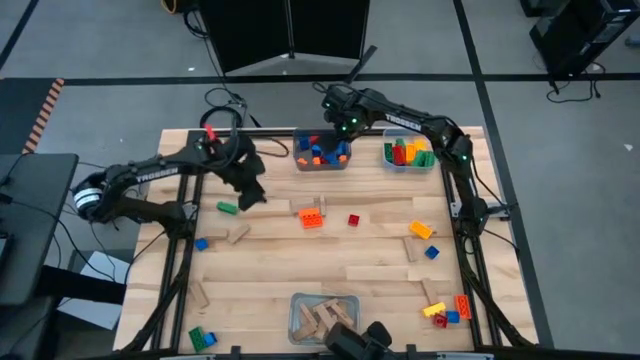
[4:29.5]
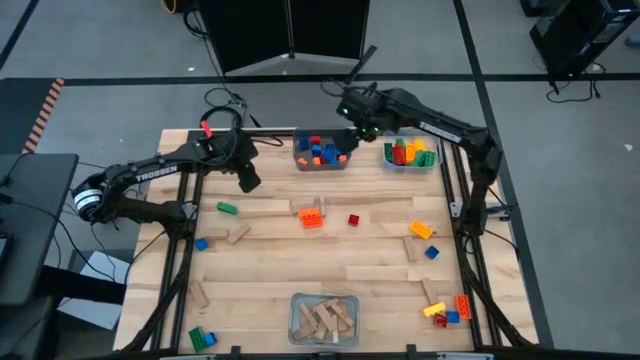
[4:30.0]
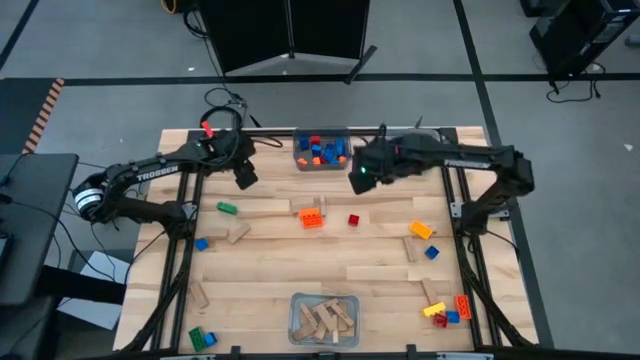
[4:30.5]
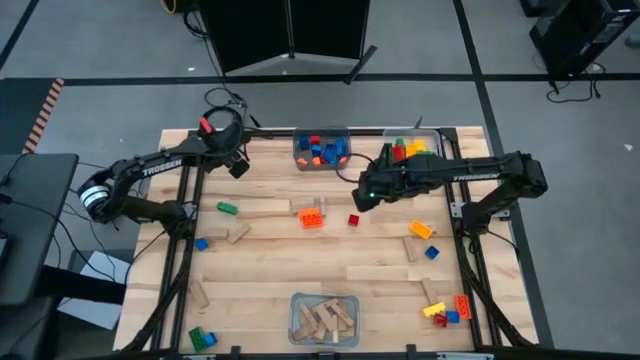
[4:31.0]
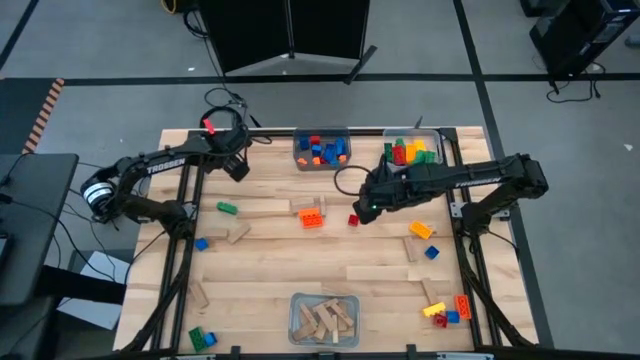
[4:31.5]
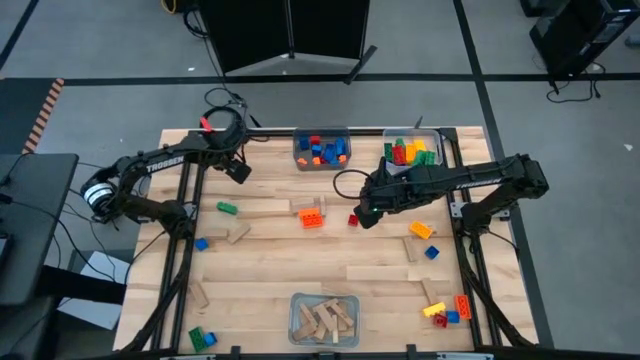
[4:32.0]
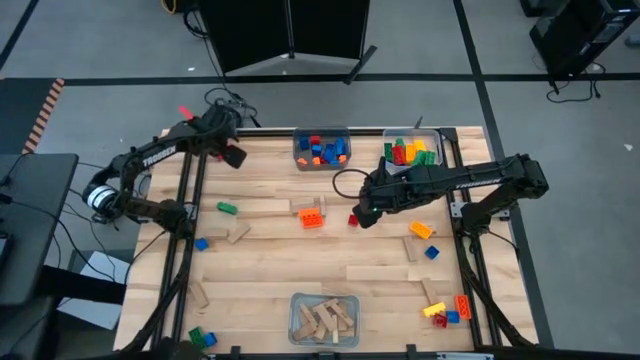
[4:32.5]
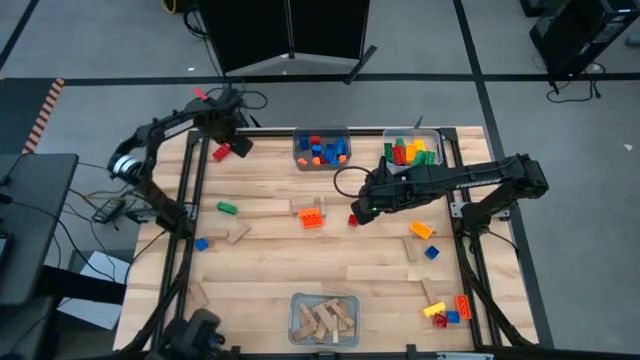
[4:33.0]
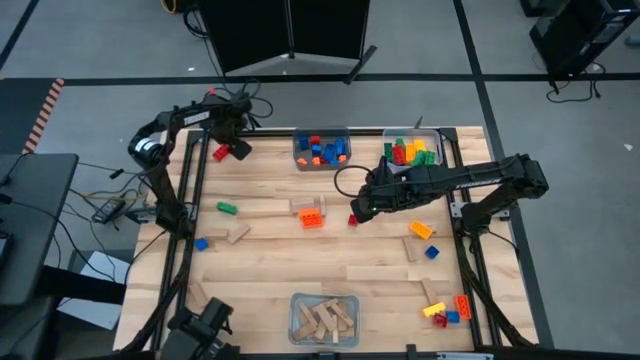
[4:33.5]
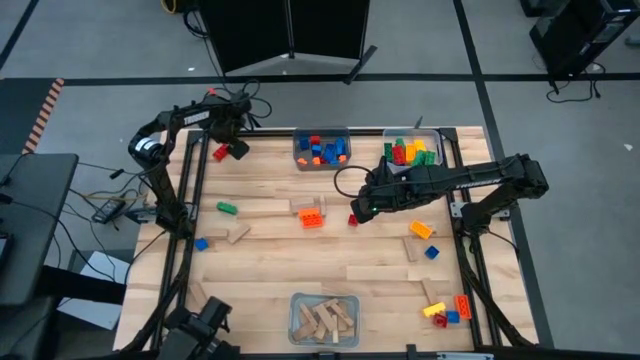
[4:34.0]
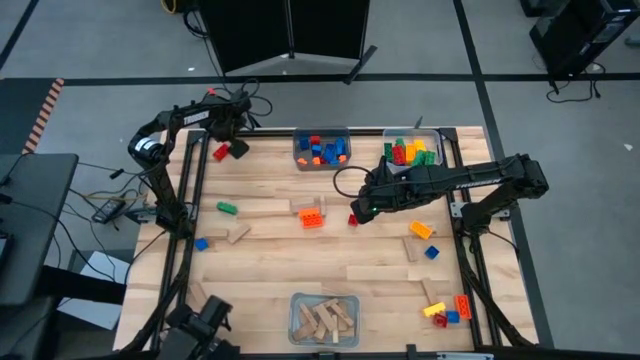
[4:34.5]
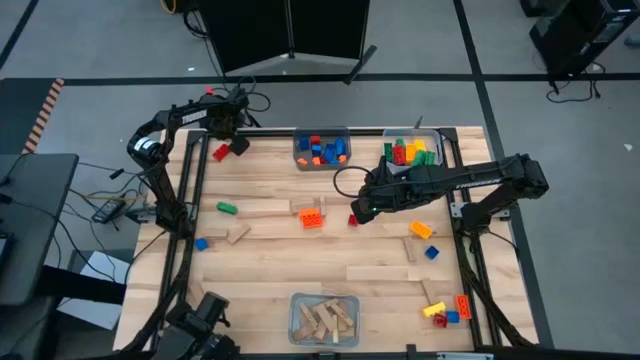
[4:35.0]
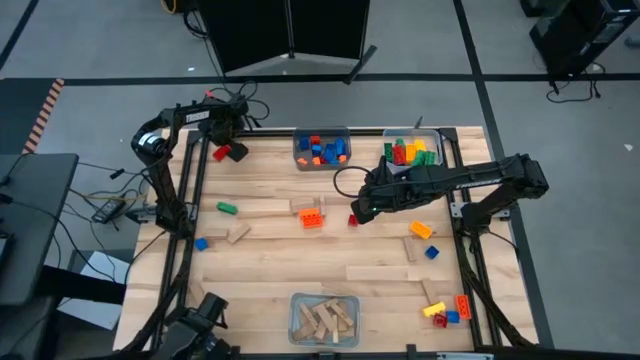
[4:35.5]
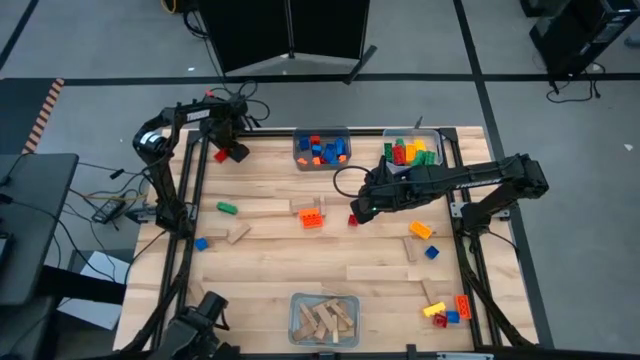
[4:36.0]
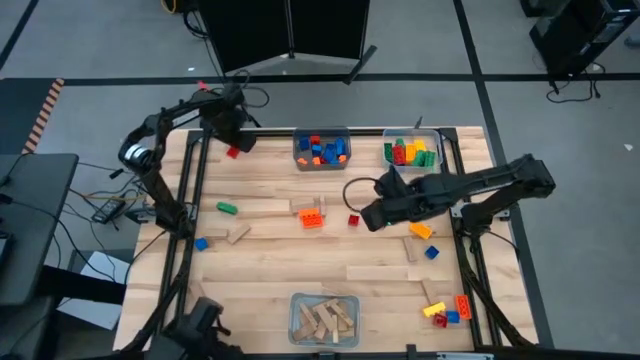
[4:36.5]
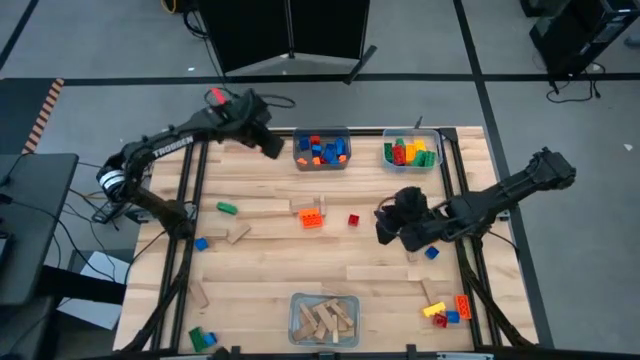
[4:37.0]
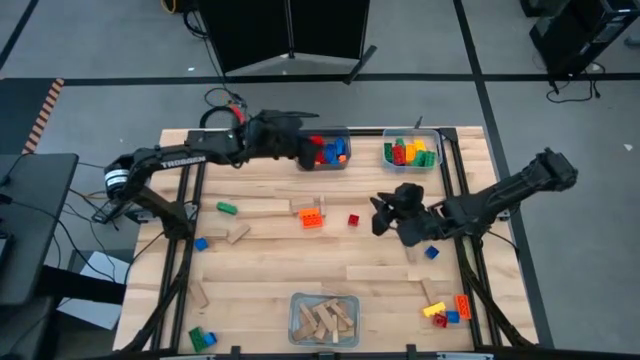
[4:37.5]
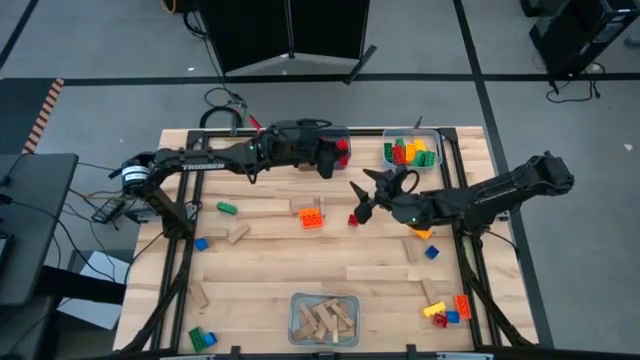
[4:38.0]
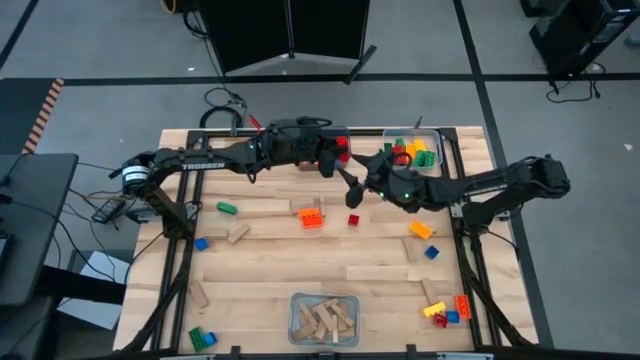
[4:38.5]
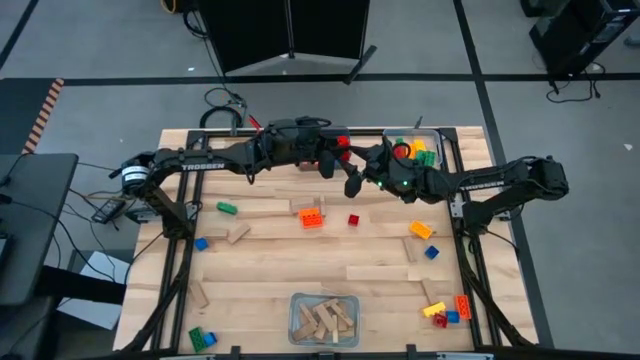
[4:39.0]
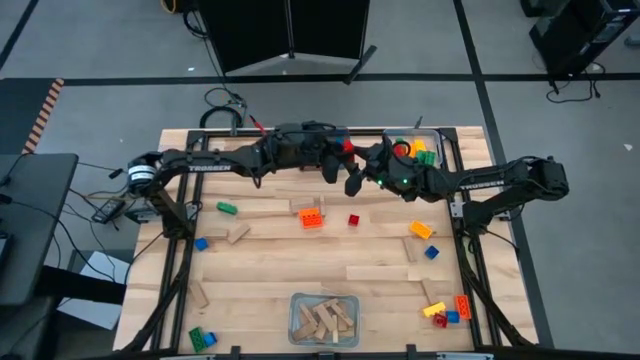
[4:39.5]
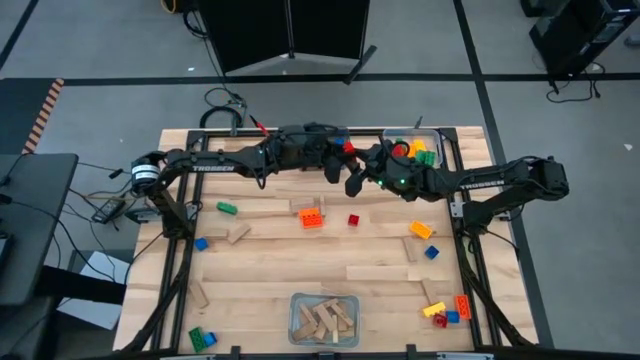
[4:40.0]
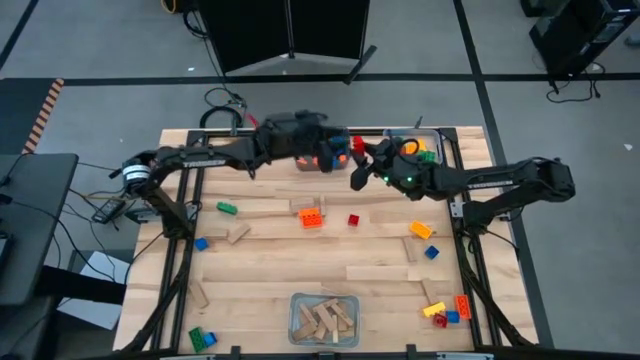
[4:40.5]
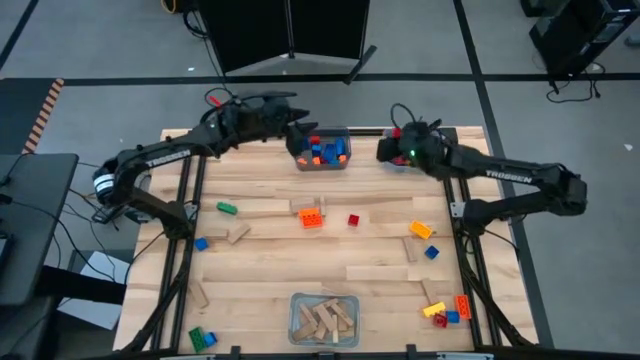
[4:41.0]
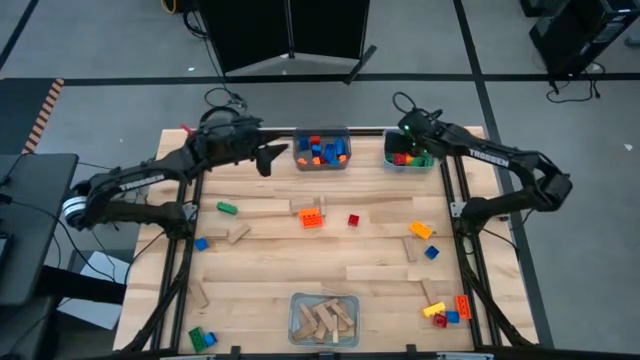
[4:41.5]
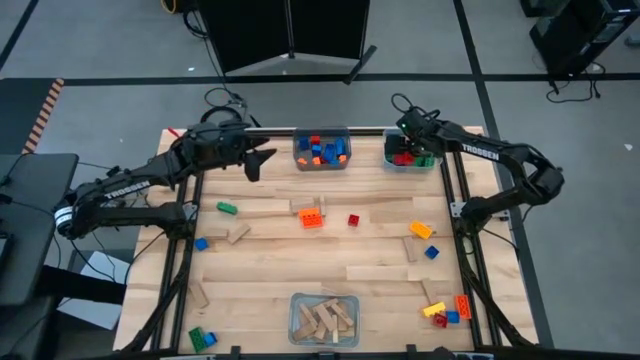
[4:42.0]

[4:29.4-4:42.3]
Task: Sort blocks by size
Put the large red game piece into the transparent bin

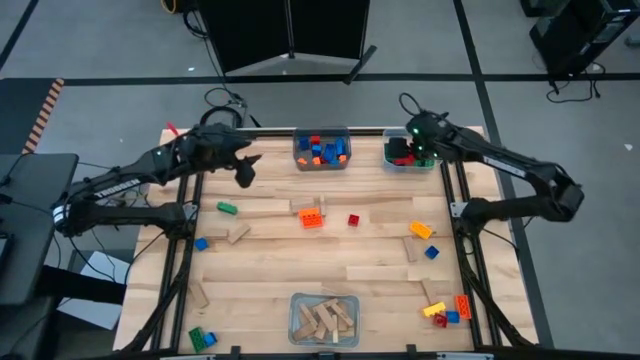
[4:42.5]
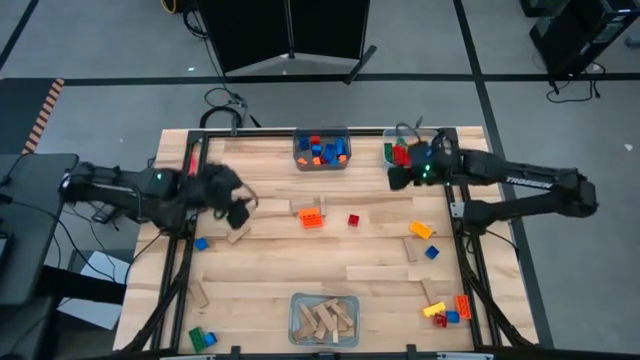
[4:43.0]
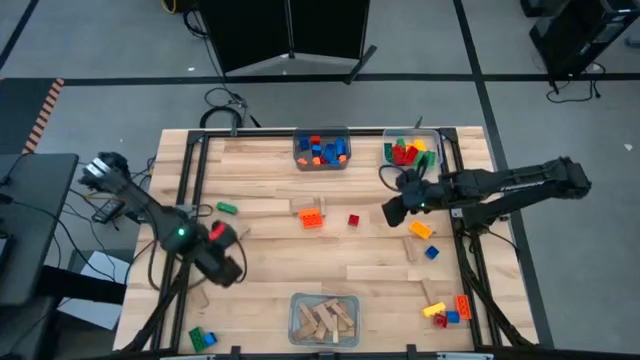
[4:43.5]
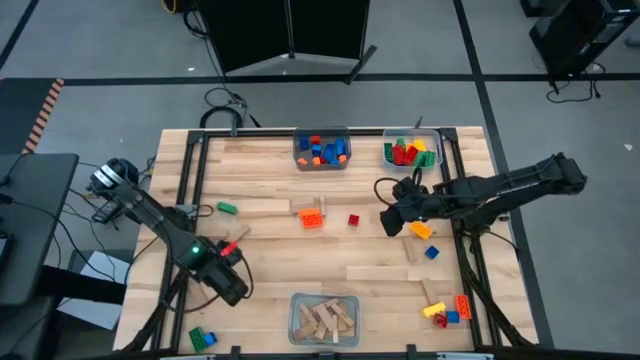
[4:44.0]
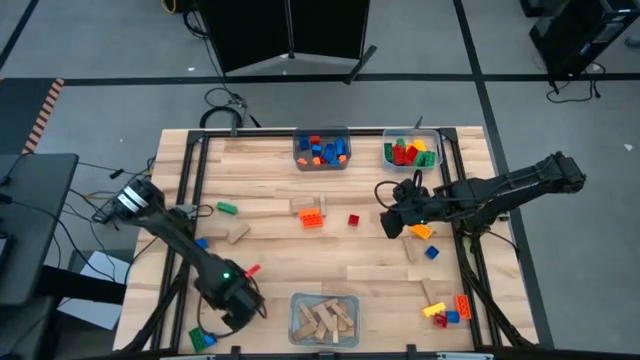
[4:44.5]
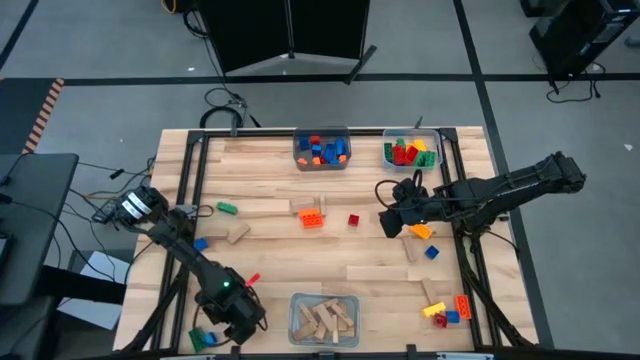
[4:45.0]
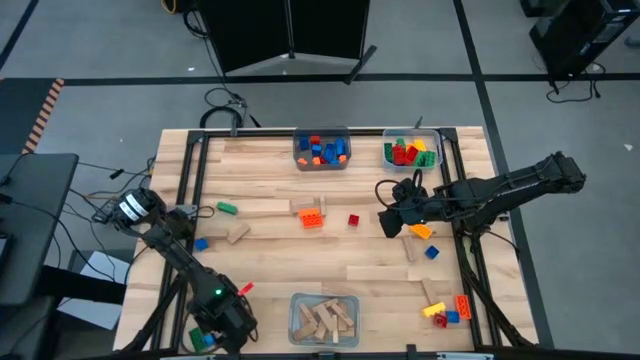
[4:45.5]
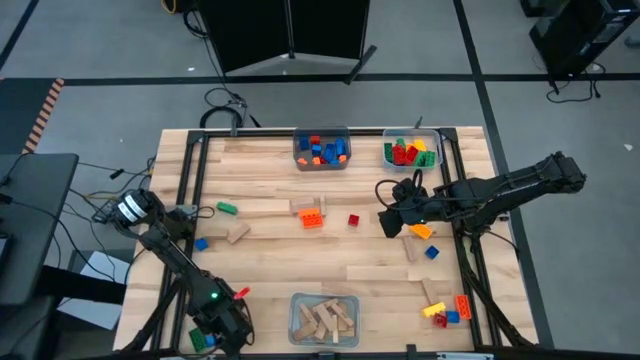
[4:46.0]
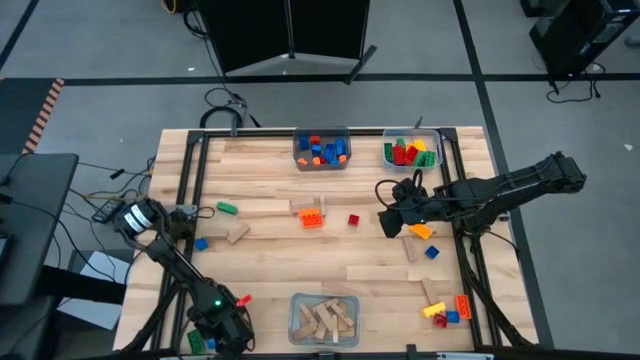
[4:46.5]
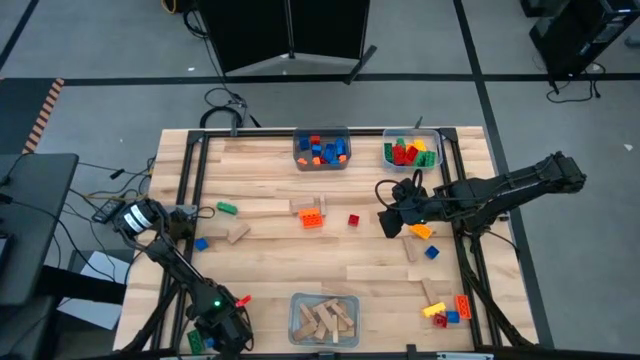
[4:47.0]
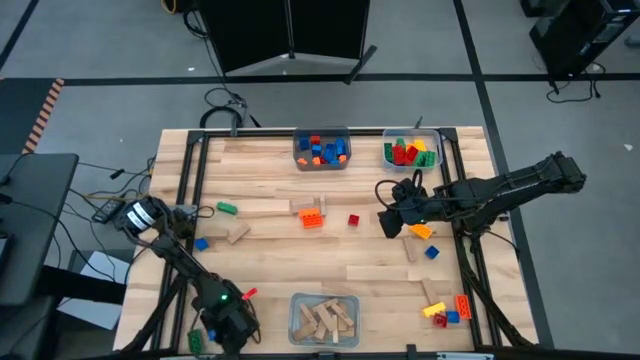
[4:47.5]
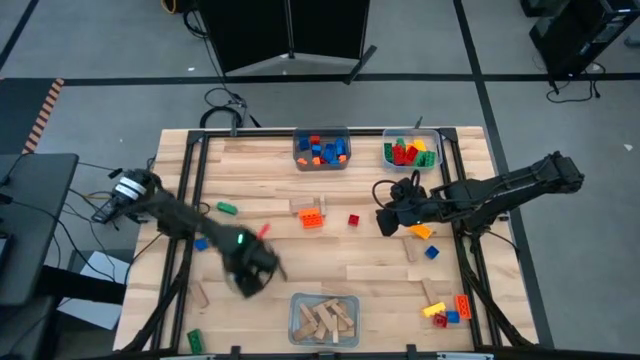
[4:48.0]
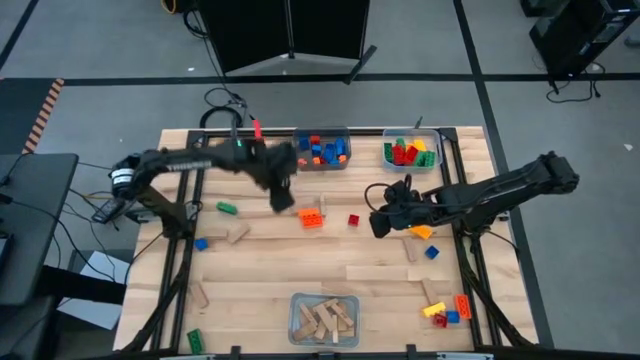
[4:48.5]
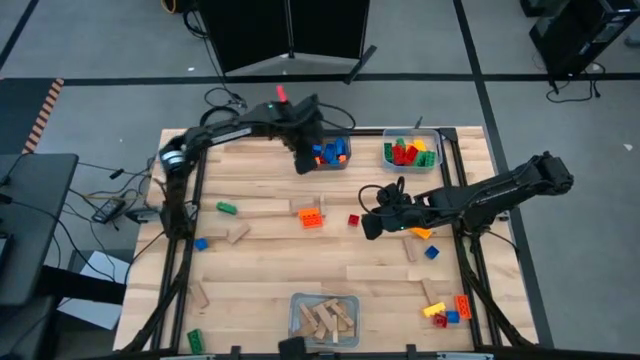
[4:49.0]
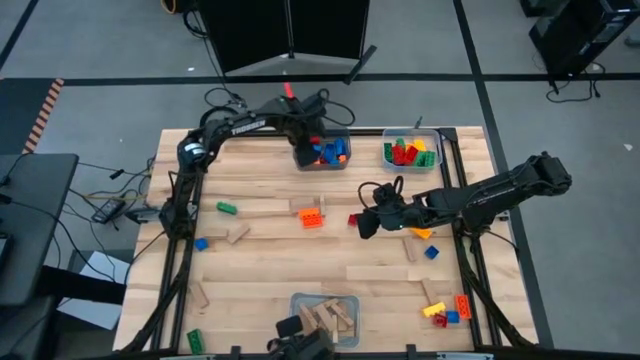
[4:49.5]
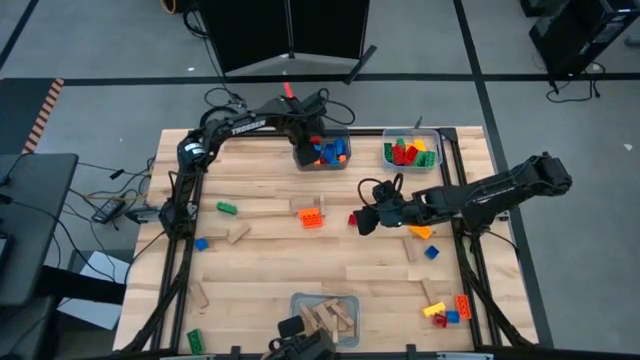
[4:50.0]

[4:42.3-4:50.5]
Put the small blue game piece into the black bin

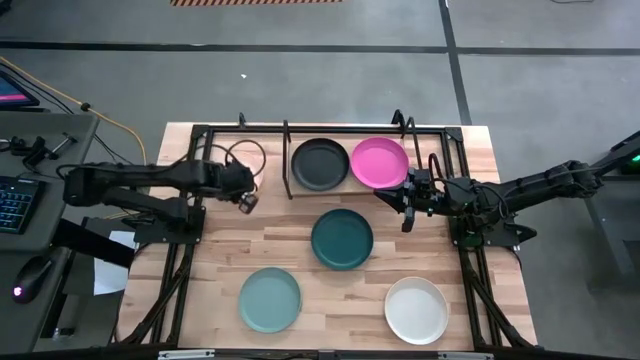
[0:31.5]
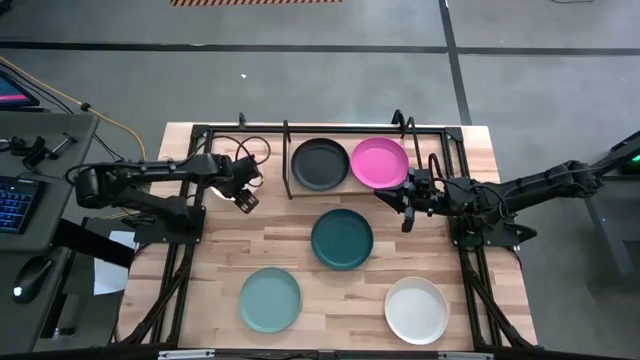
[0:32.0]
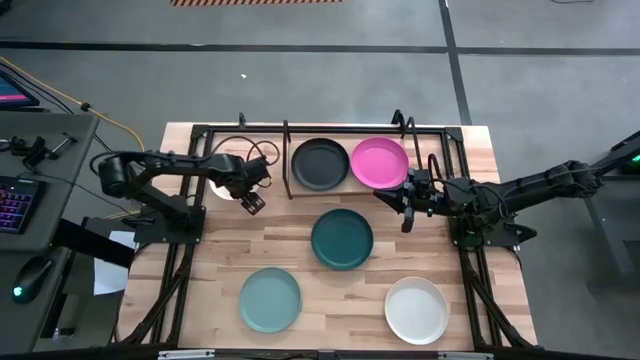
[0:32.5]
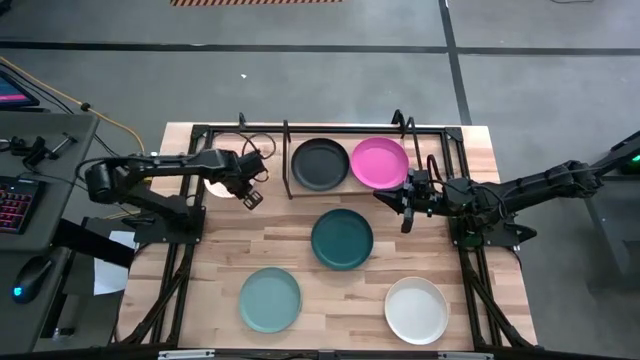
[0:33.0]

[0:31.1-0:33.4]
Task: Place and stack plates onto a shelf
Stack the light pink plate on top of the black plate on the shelf
